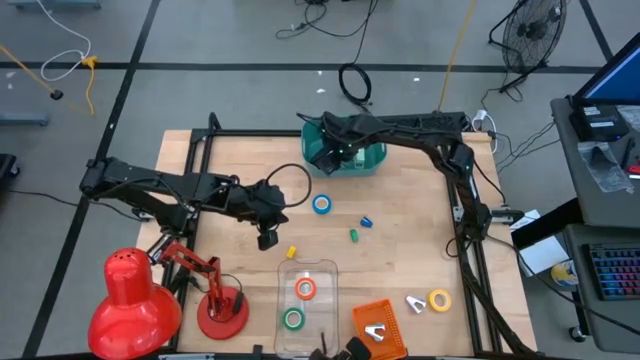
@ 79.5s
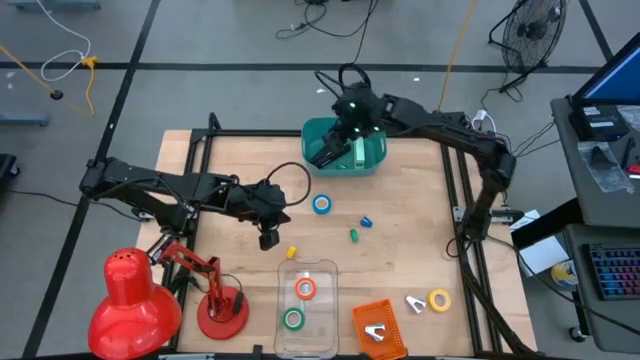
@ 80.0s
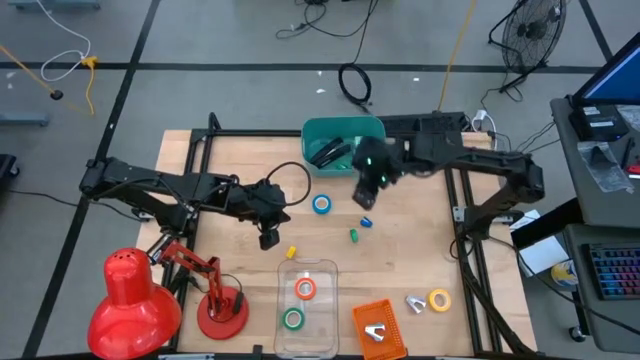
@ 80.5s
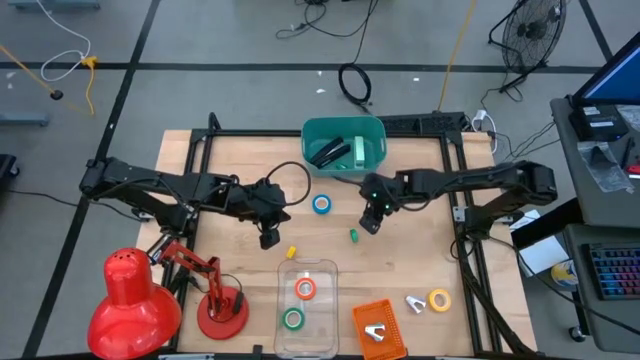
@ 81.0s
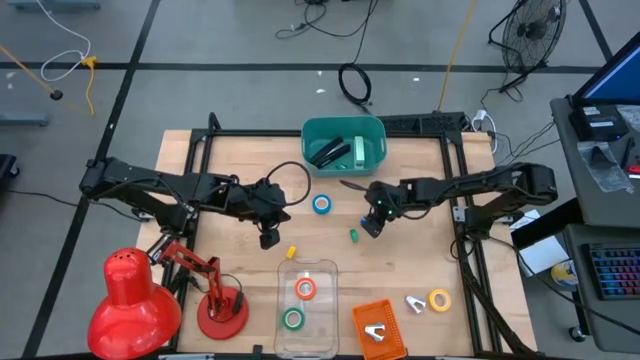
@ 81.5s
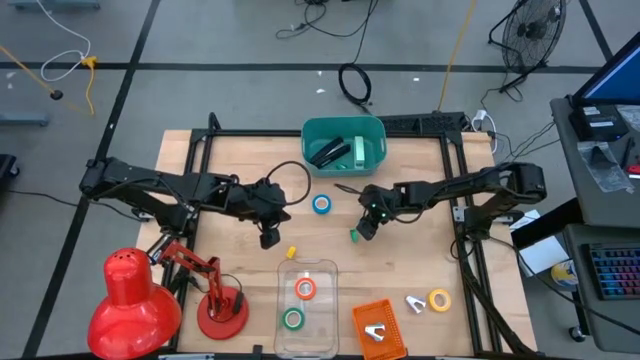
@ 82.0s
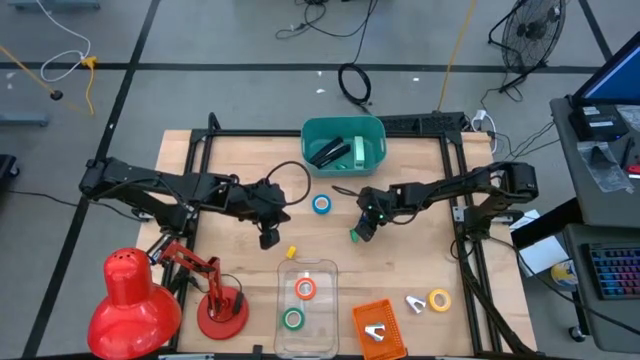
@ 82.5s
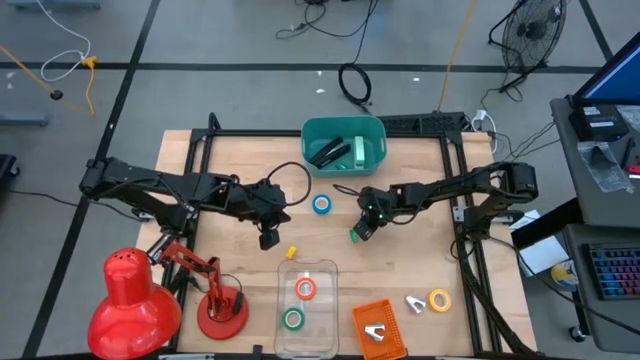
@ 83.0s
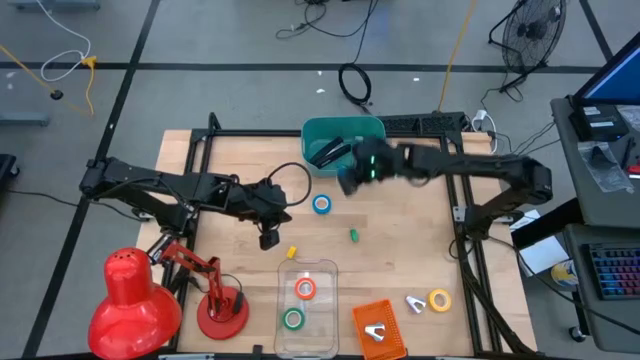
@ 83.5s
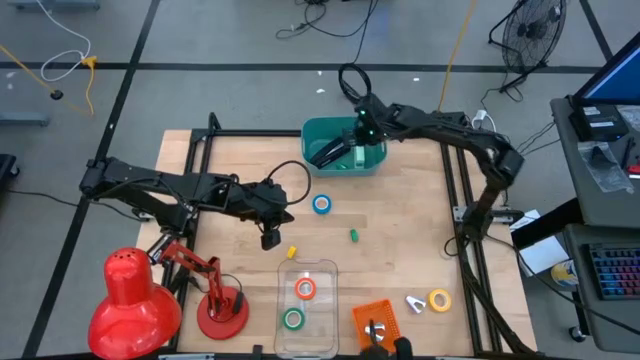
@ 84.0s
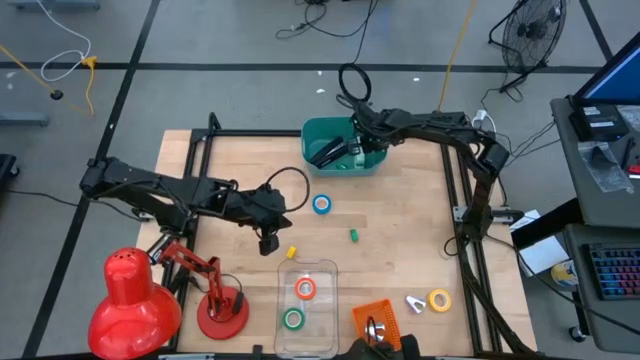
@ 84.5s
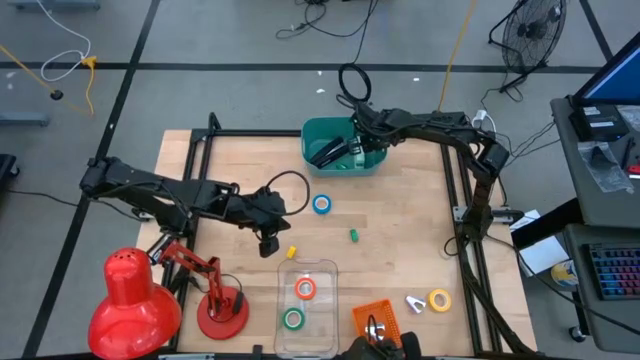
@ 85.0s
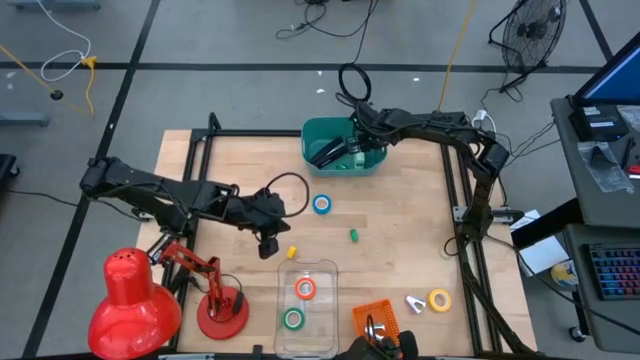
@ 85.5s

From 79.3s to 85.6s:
Task: Pick and place Stapler, Stapler remover, tape
Put the blue stapler into the green bin

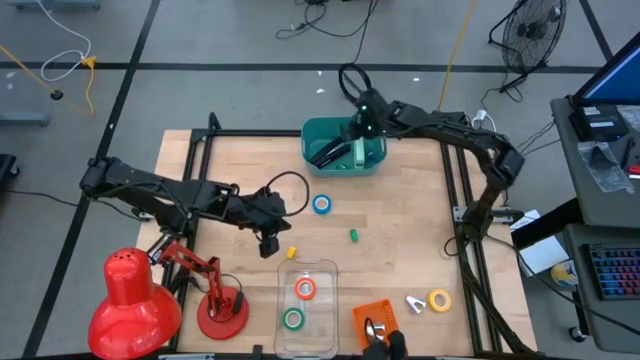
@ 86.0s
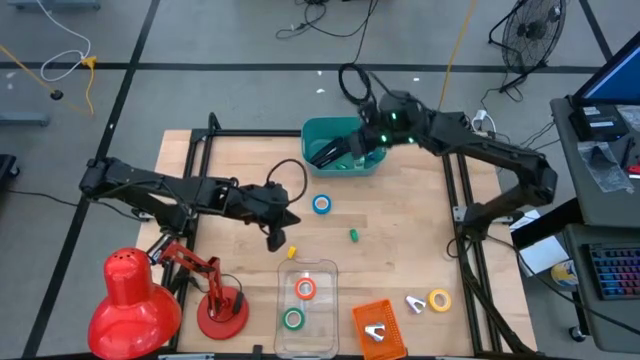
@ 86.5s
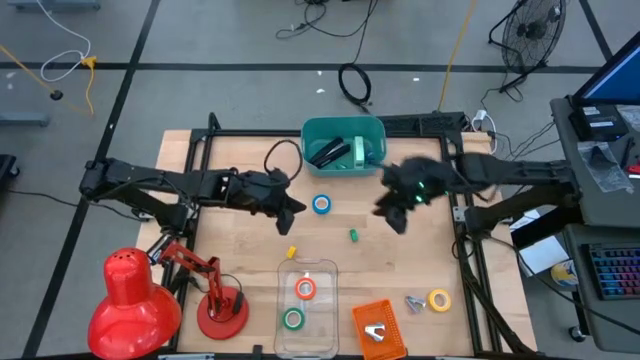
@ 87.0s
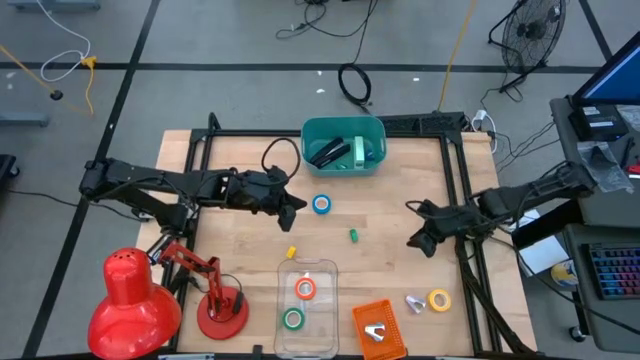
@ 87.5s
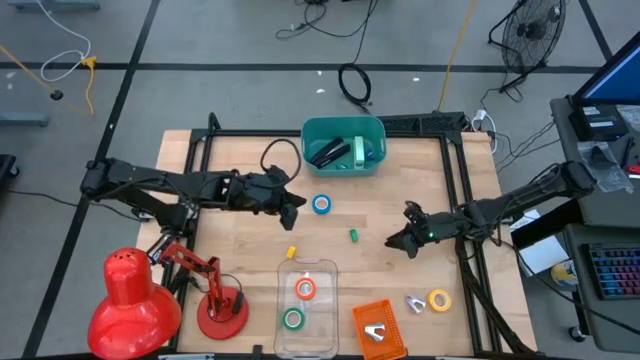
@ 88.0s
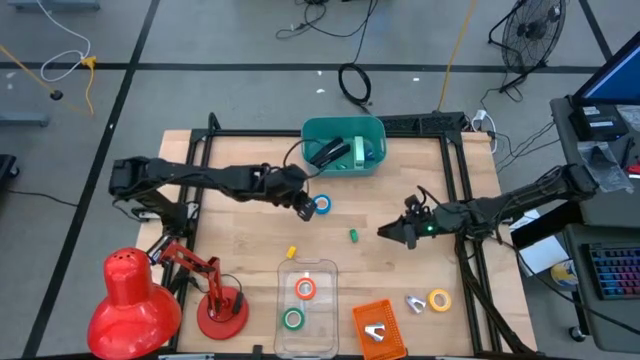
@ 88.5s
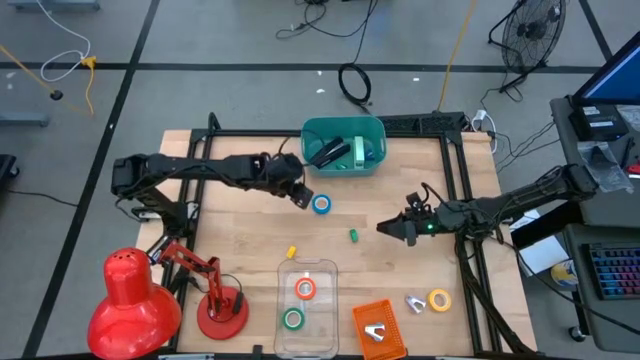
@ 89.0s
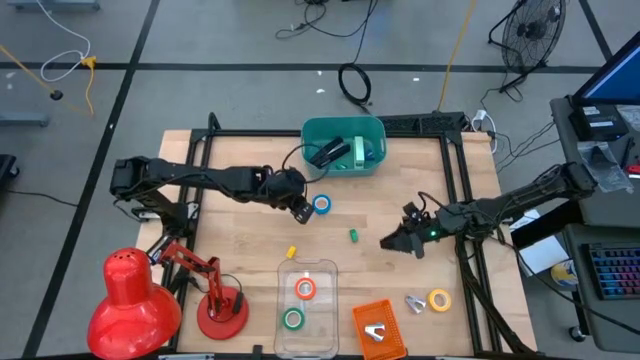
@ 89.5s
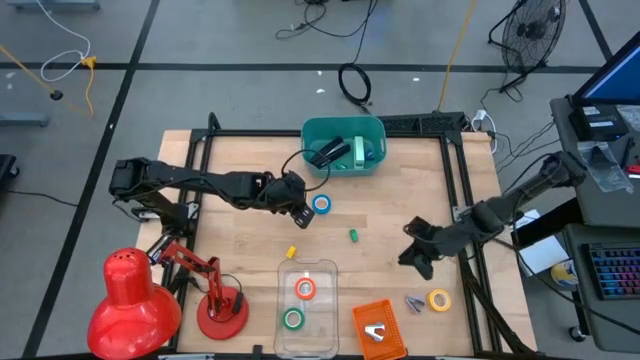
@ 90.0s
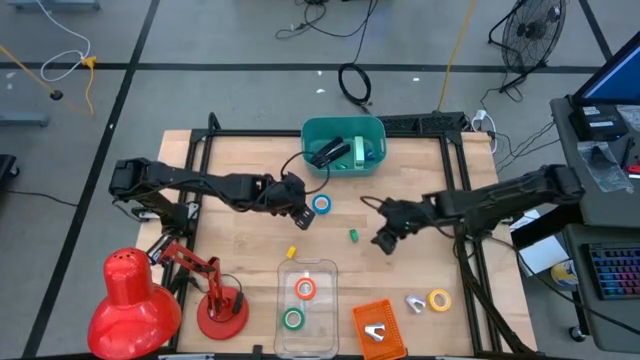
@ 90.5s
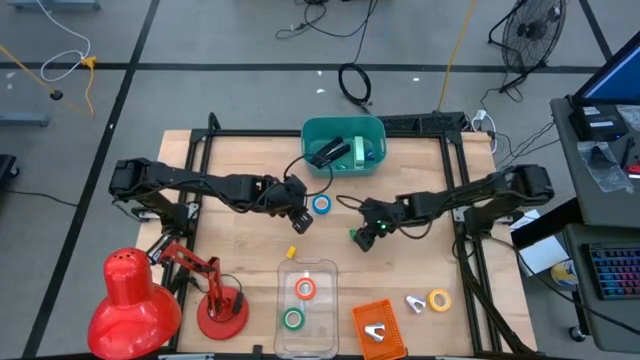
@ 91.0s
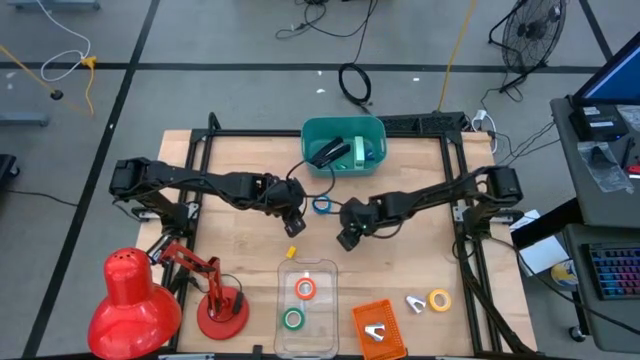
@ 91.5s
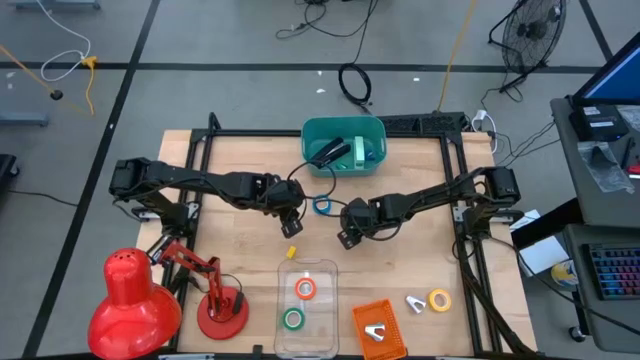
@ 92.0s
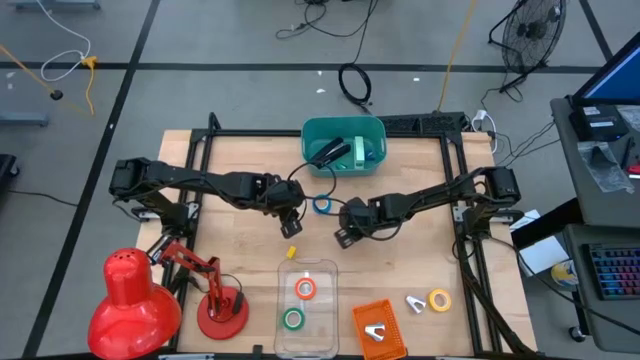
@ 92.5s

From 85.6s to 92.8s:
Put the green stapler into the green bin

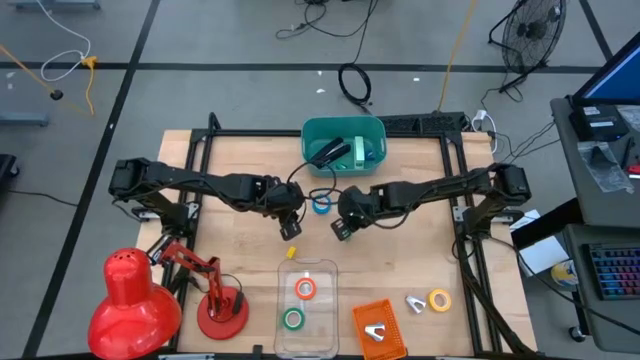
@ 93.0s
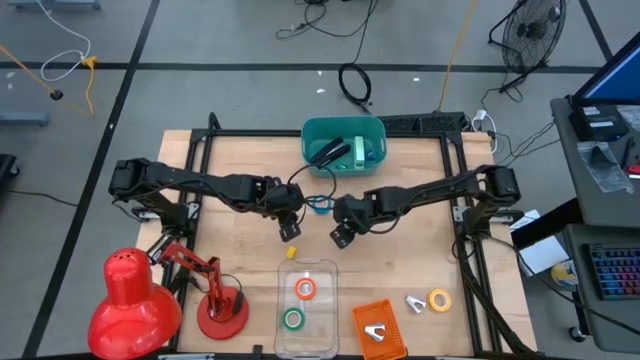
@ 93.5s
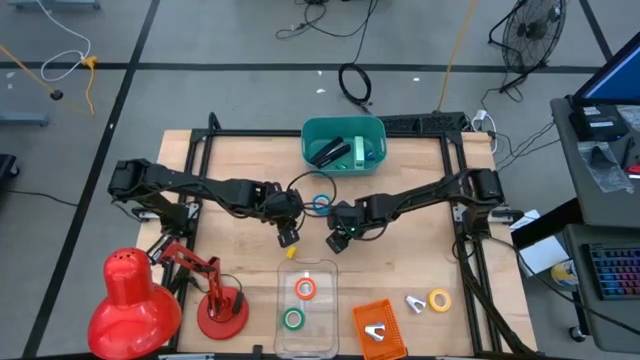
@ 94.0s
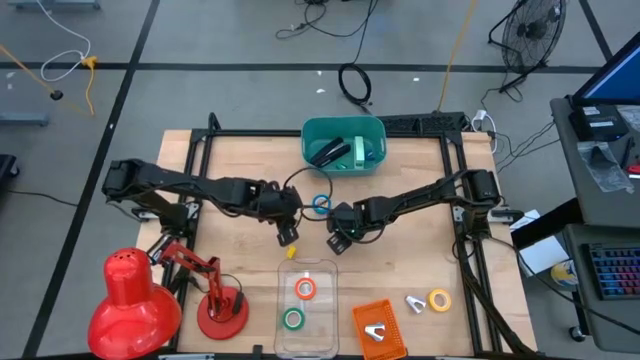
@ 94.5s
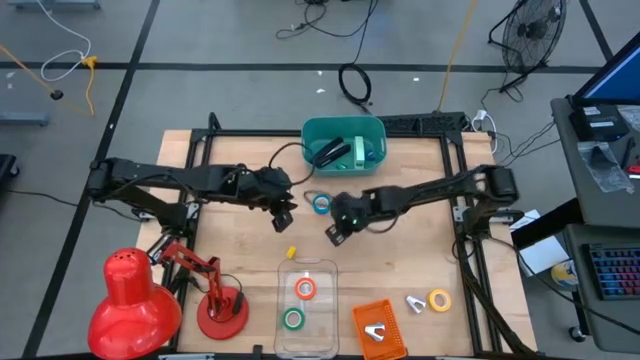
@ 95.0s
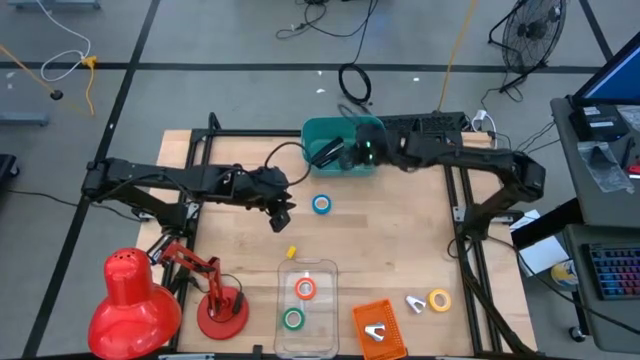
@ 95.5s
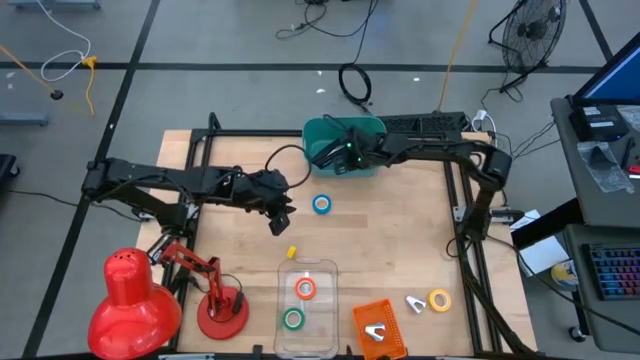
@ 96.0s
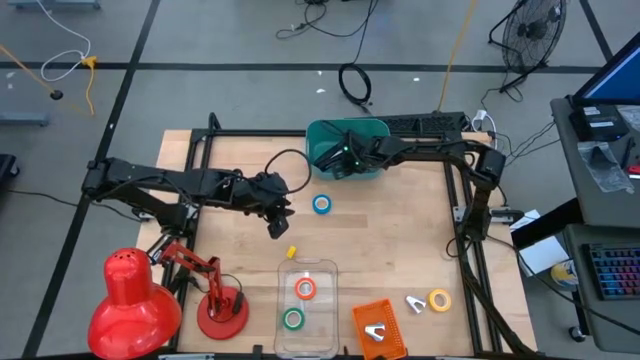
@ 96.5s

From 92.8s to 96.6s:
Put the green stapler into the green bin

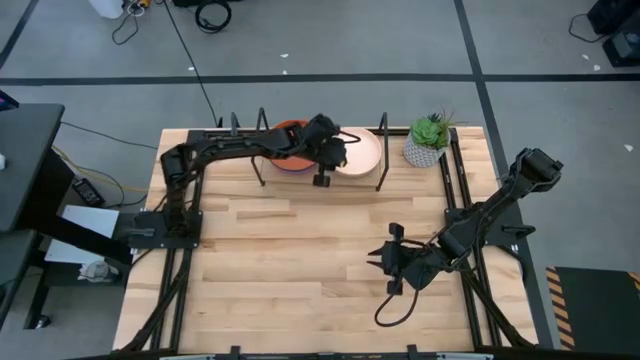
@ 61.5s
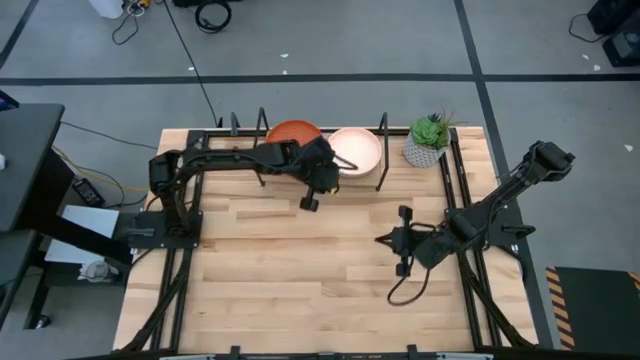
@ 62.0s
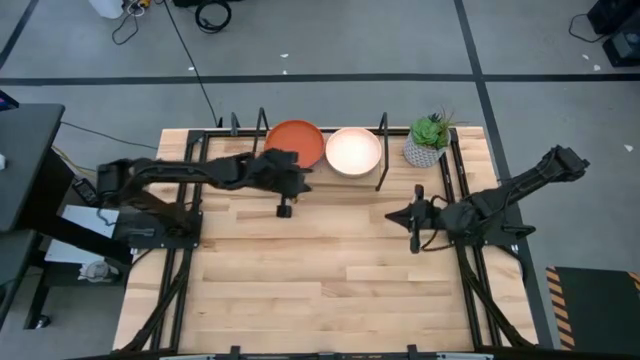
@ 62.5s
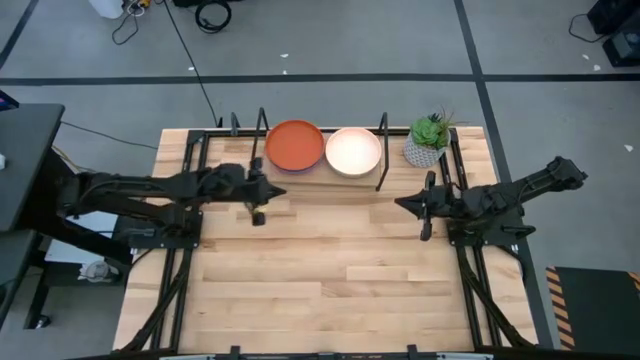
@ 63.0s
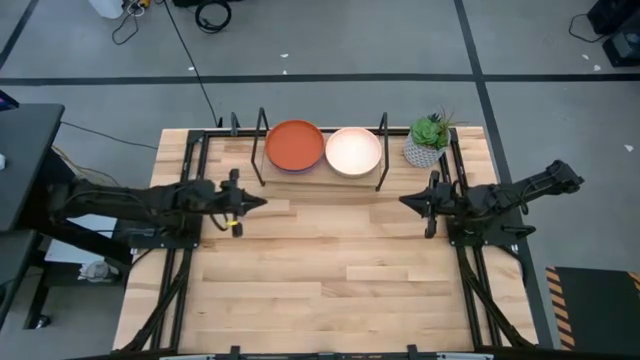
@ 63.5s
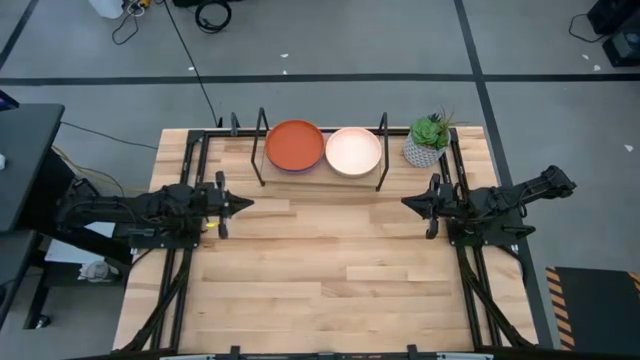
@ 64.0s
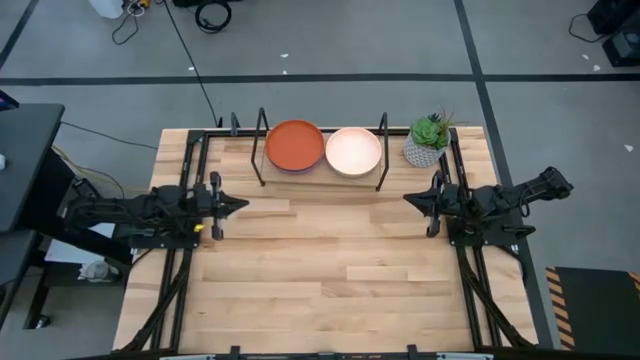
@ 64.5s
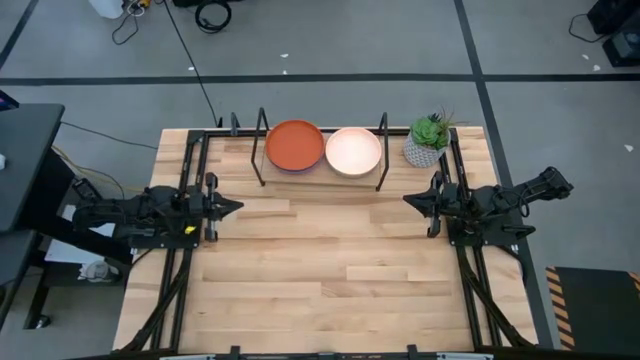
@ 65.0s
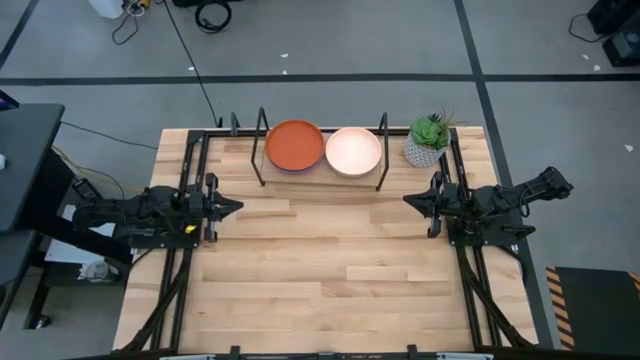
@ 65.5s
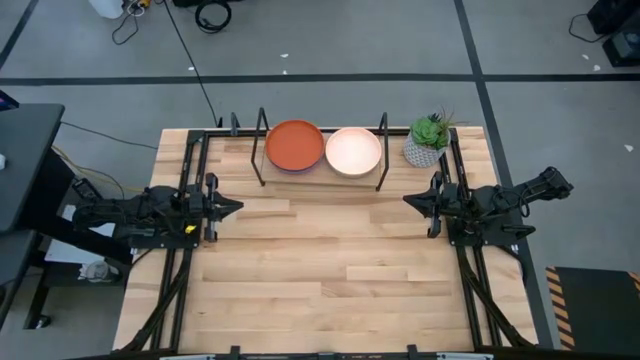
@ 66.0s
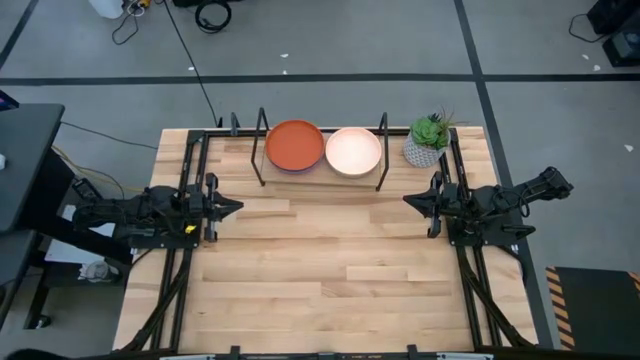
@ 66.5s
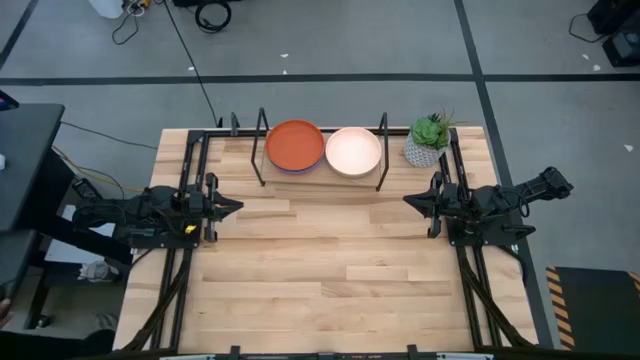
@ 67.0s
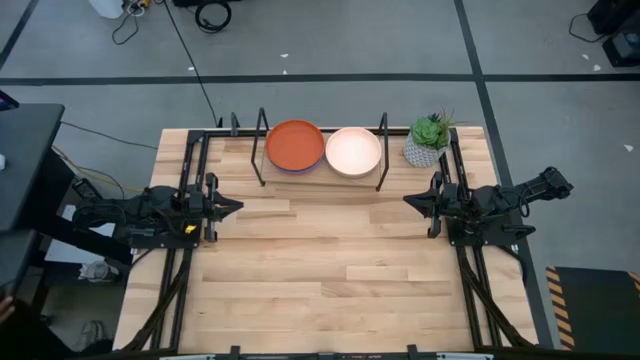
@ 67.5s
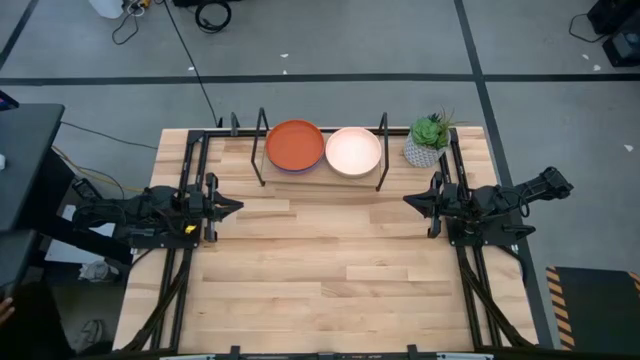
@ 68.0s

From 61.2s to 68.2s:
Task: Place and stack plates onto a shelf
Return to Home Position
